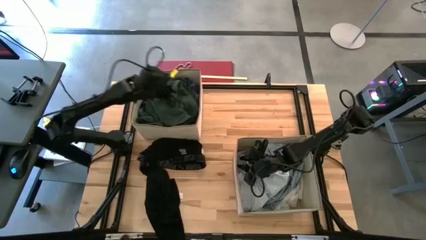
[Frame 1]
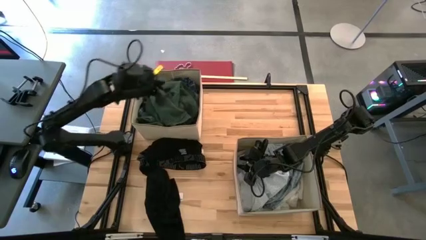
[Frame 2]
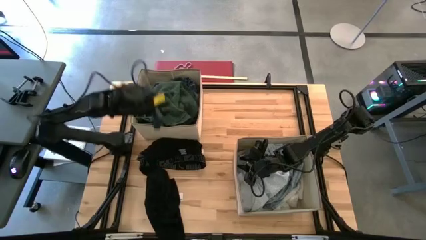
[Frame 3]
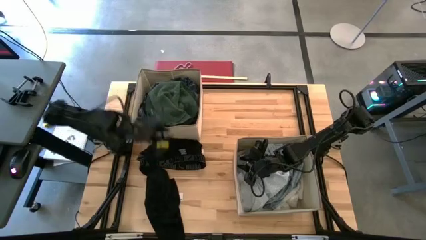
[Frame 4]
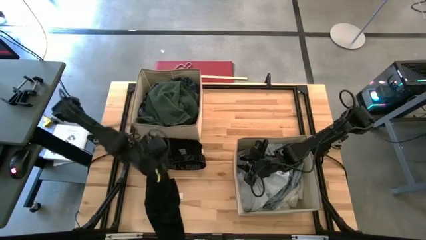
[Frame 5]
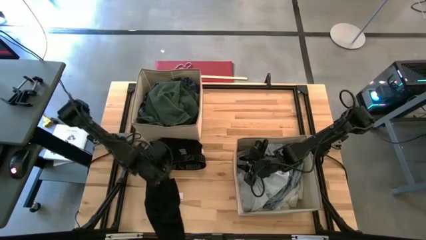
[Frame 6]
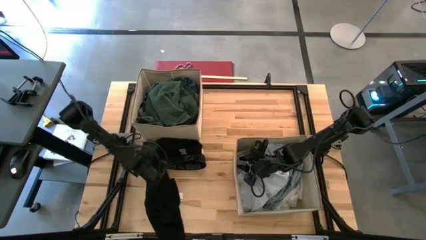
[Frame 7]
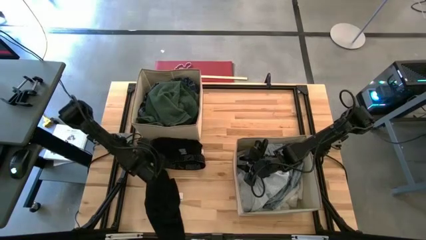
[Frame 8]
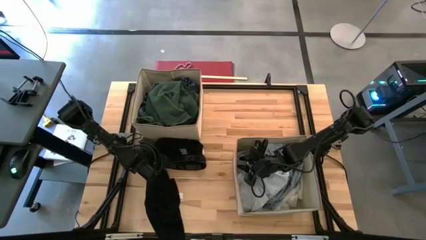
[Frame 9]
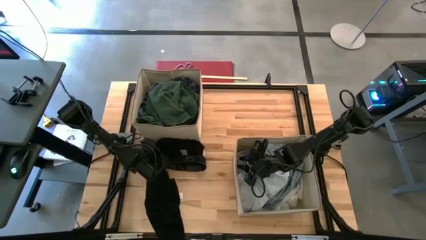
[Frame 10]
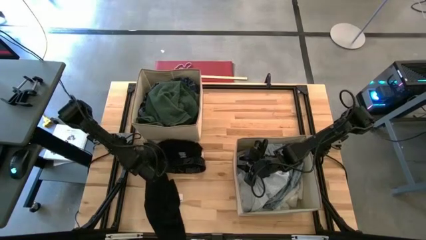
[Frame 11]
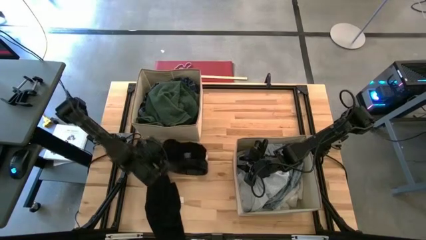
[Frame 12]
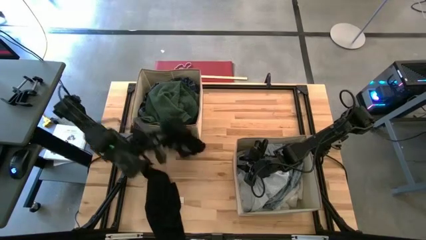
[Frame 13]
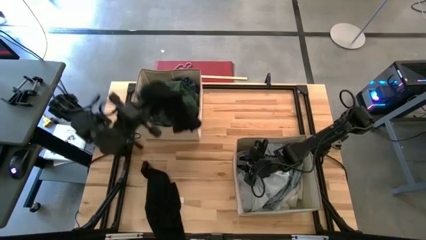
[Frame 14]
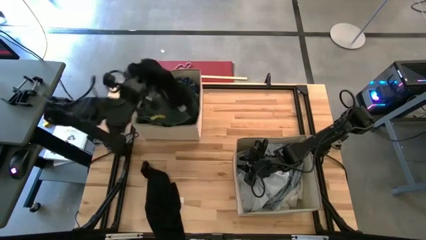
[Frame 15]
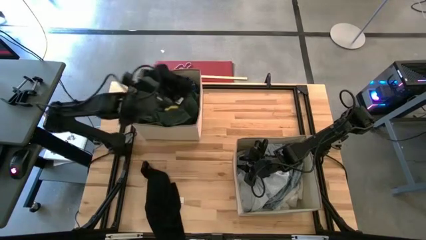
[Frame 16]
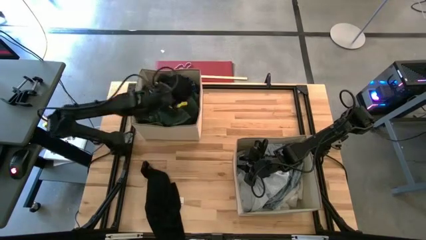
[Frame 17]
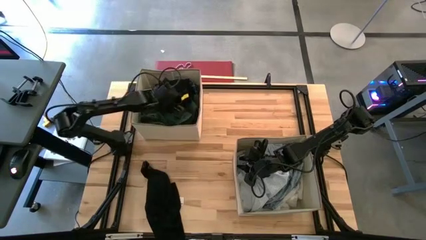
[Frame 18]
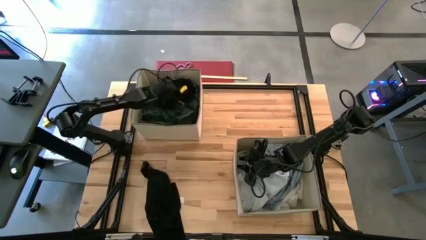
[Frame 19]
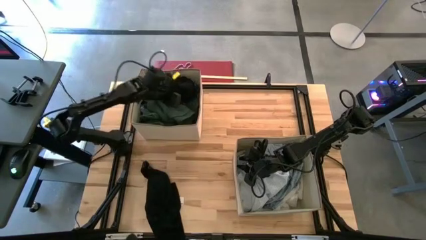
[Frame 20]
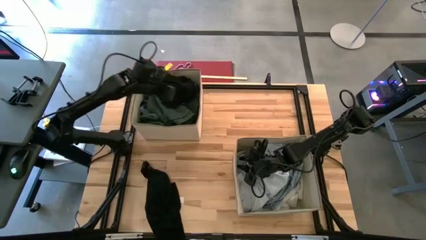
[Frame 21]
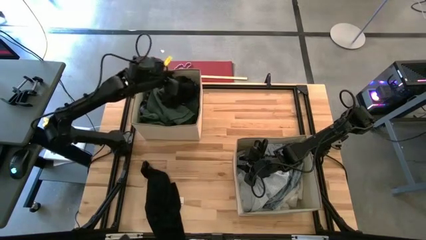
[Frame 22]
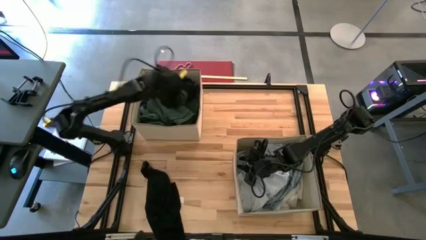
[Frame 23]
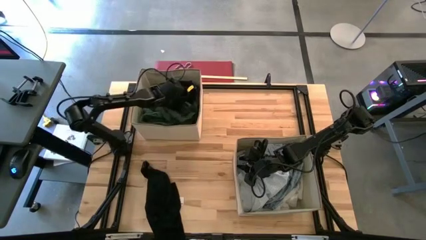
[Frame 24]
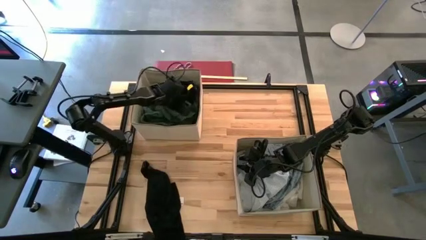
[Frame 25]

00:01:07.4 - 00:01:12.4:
Task: Sort clothes
Put the black underwear into the top white laundry bin

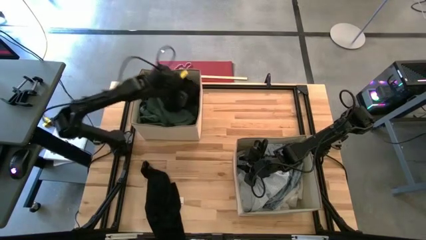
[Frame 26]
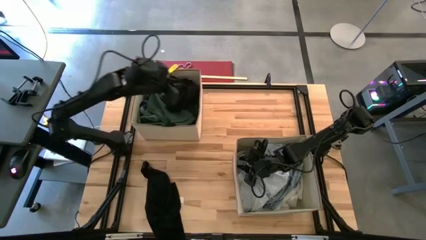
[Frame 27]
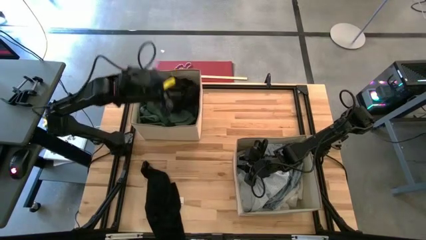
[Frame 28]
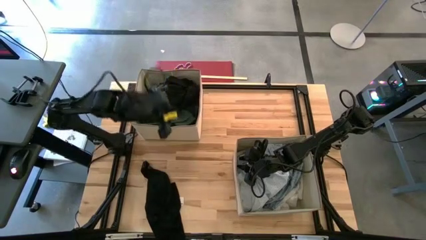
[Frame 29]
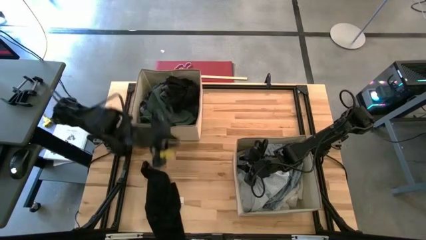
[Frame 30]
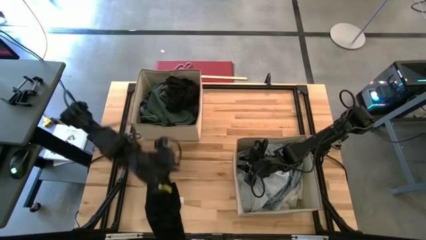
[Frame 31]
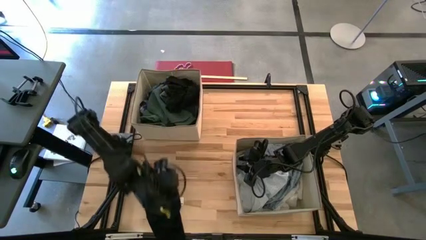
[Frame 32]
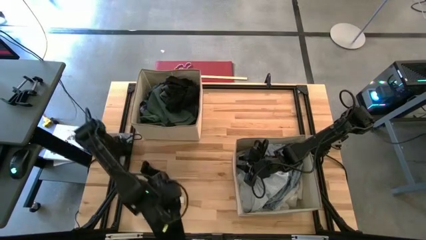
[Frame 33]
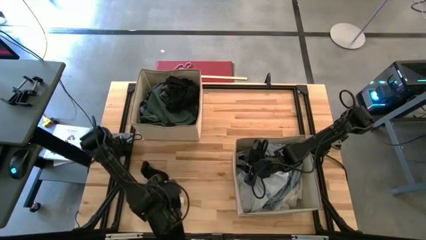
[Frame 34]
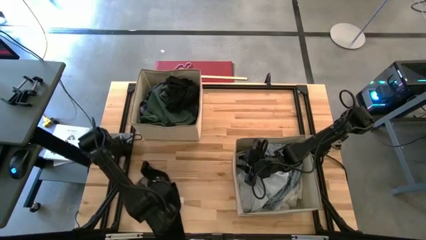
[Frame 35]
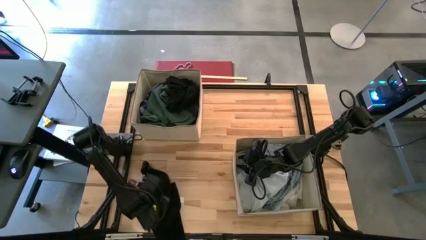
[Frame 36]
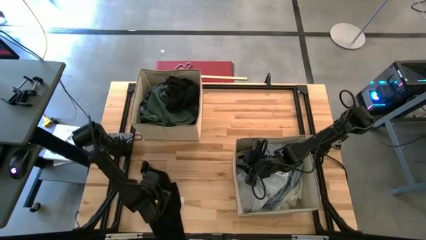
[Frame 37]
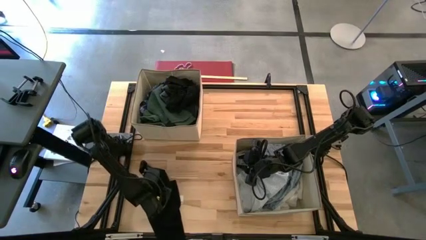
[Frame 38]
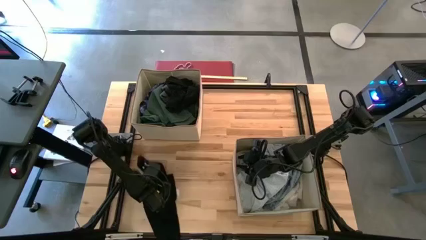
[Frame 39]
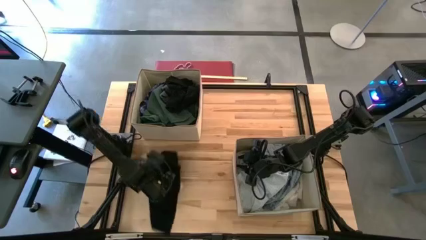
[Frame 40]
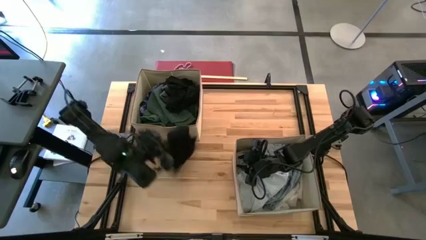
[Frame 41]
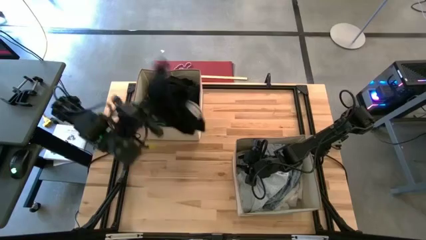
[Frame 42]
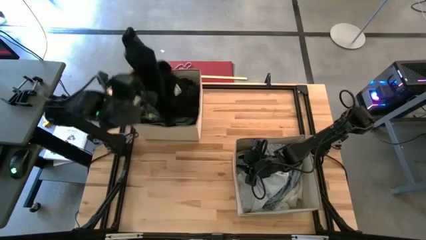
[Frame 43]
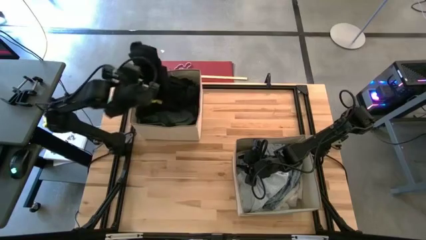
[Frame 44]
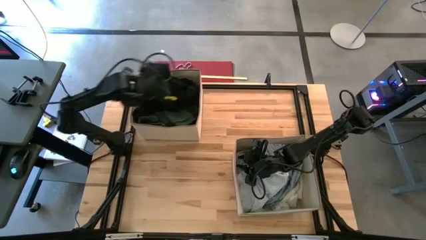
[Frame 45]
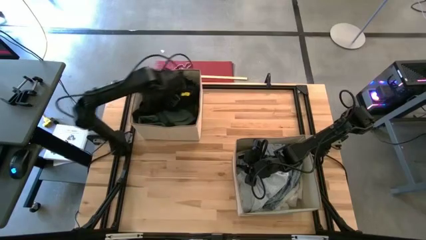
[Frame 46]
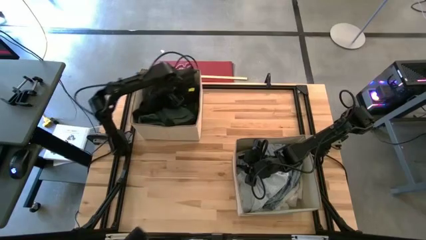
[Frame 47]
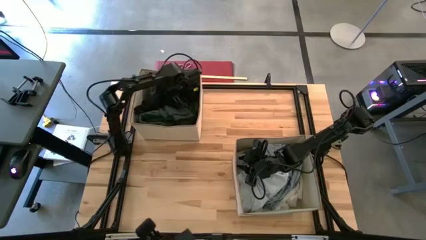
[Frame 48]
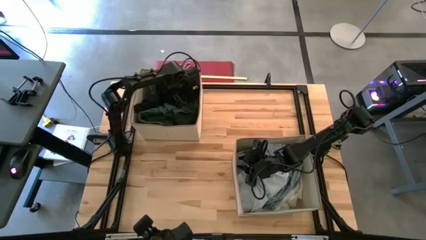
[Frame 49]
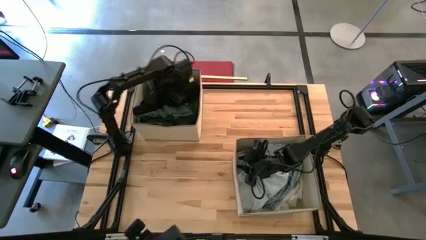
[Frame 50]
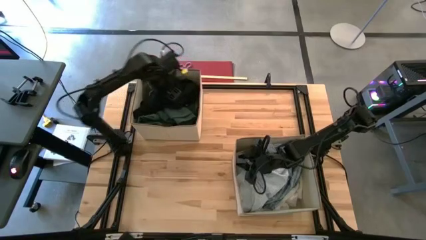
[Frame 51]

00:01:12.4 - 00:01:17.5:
Put the black shirt into the top white laundry bin

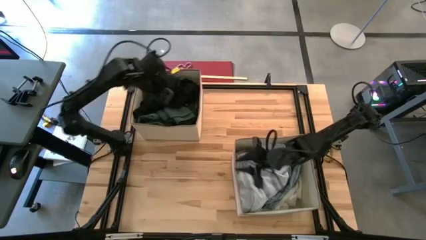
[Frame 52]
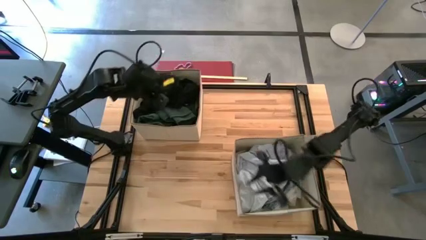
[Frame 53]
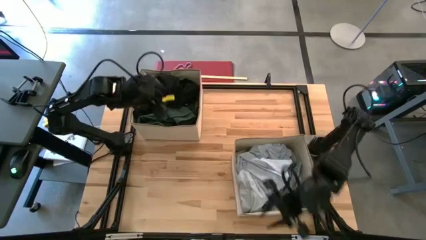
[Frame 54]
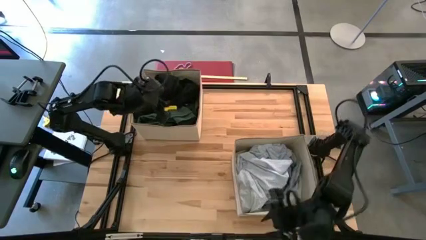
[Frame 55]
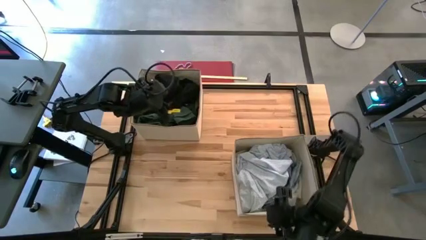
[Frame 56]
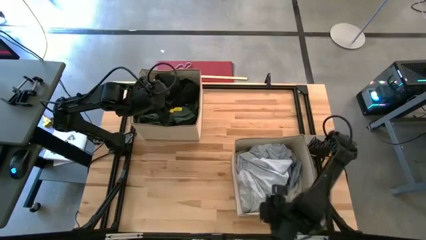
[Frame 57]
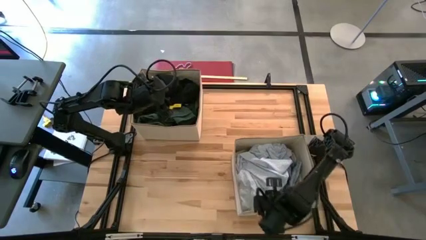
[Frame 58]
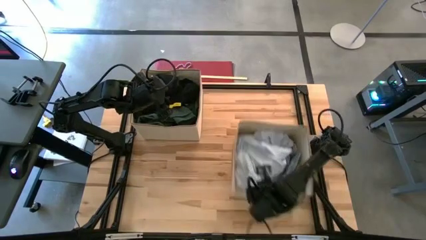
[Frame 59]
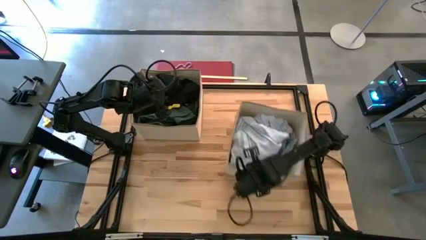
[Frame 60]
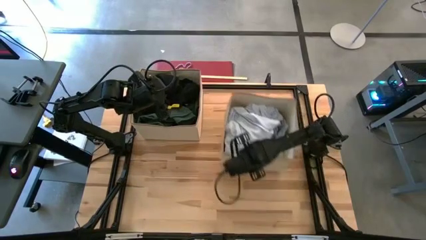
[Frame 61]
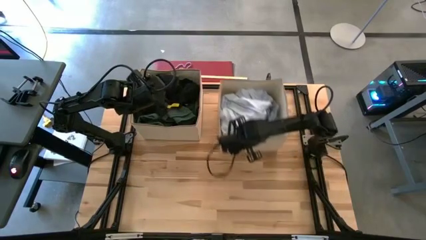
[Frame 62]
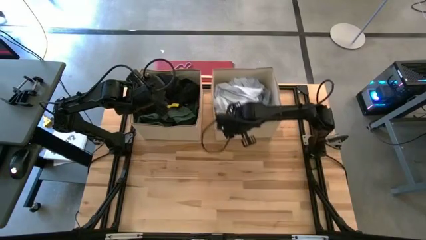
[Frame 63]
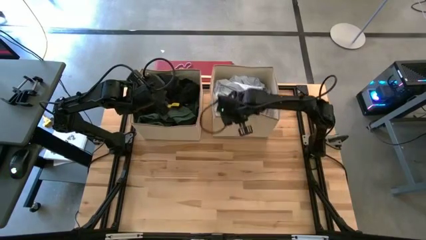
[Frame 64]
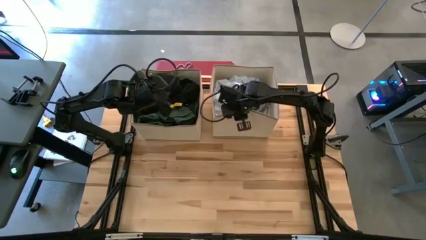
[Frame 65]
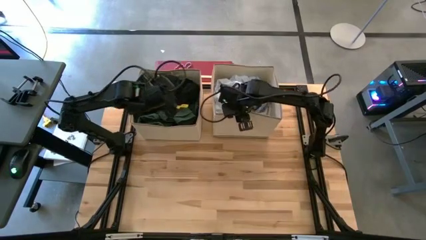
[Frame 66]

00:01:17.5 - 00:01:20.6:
Move the bottom white laundry bin to the right of the top laundry bin

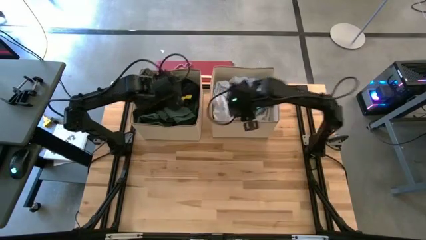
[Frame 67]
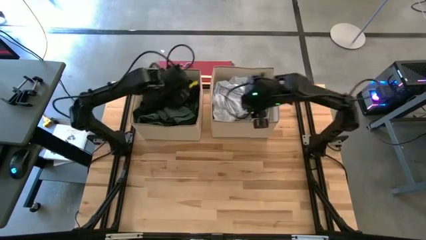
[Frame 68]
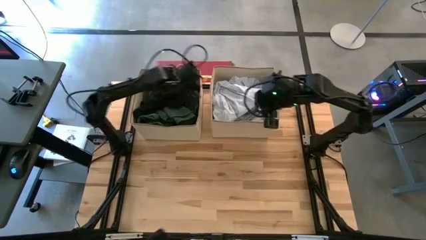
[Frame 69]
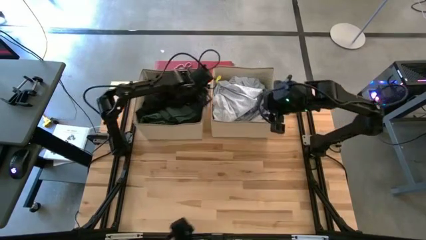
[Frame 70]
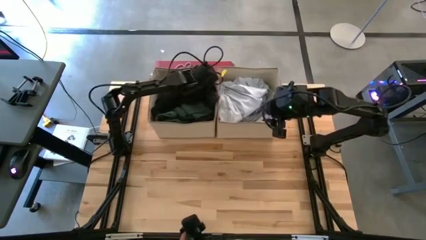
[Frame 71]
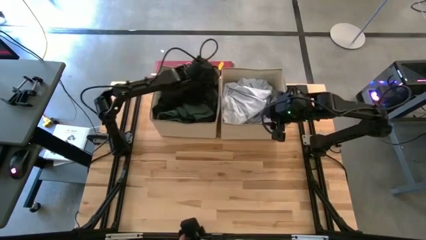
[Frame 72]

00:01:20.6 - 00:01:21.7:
Move the left white laundry bin to the left of the right white laundry bin
